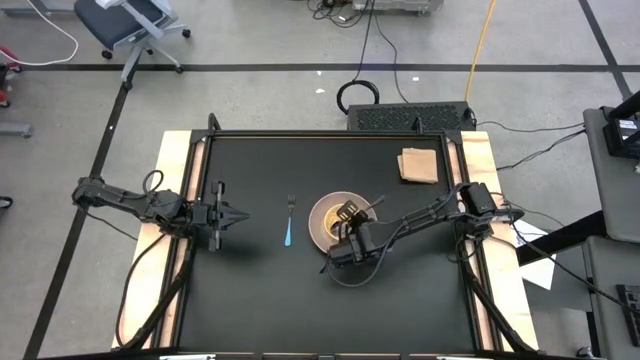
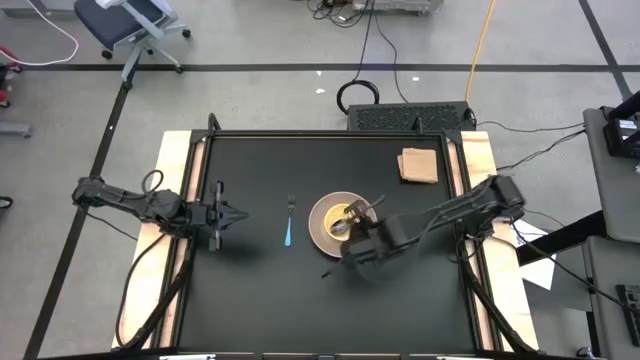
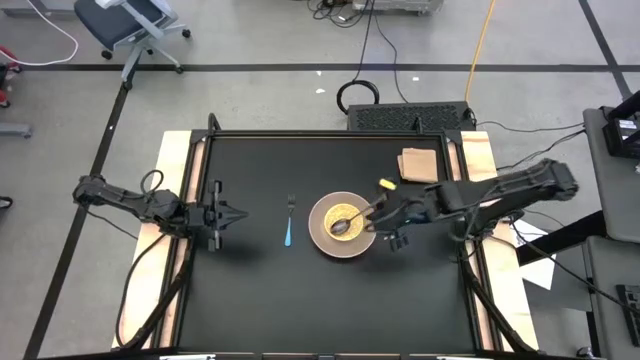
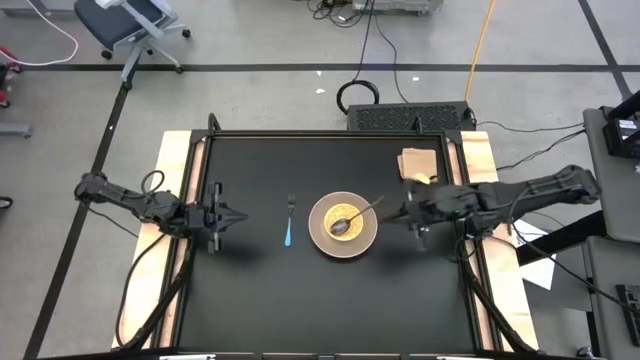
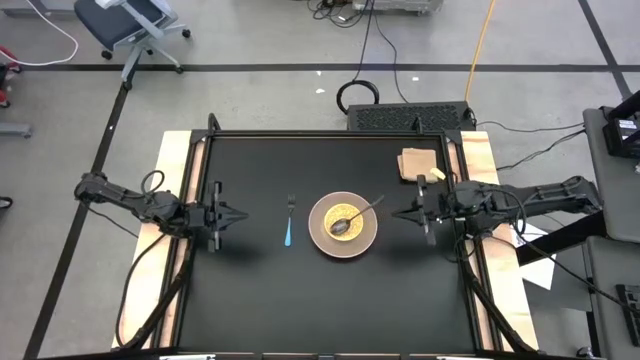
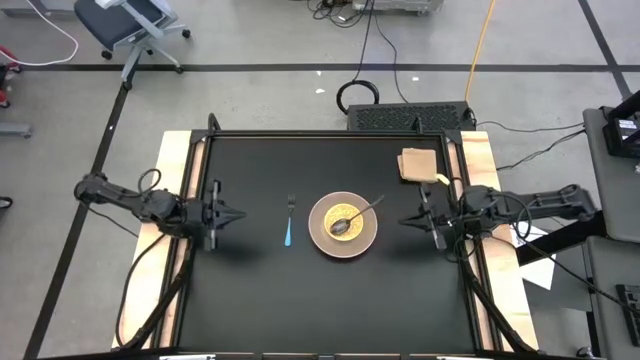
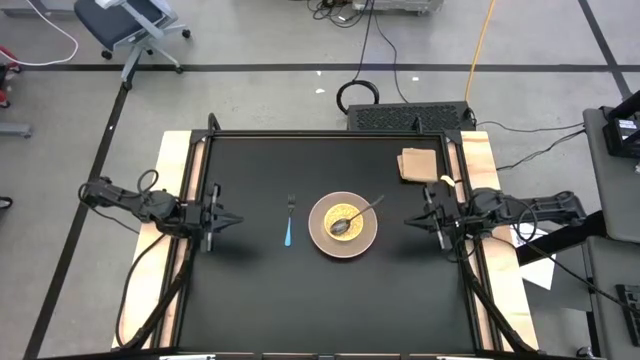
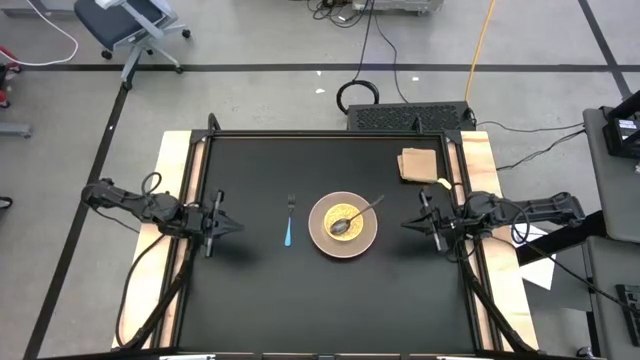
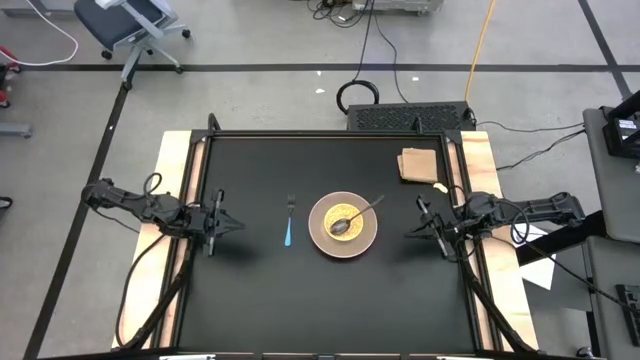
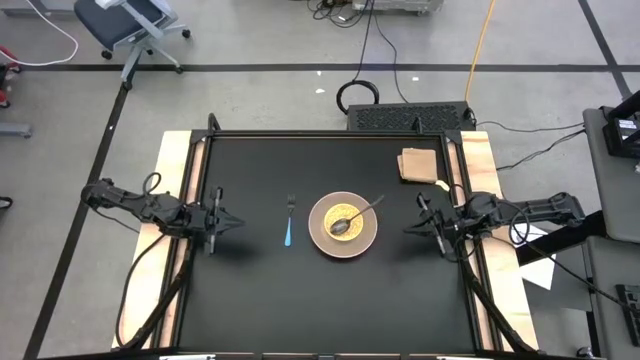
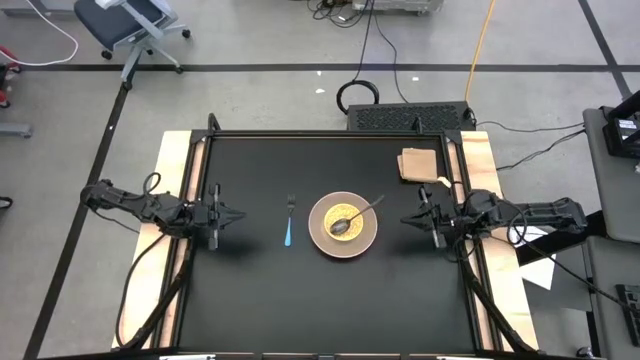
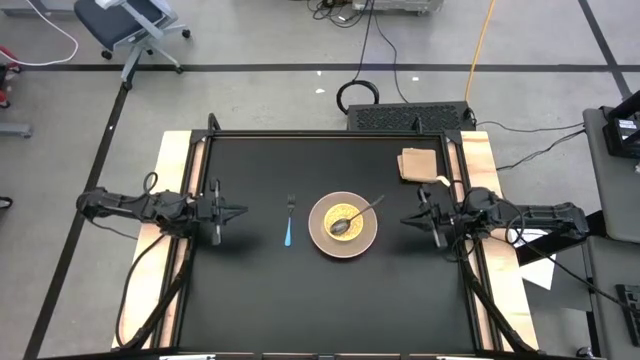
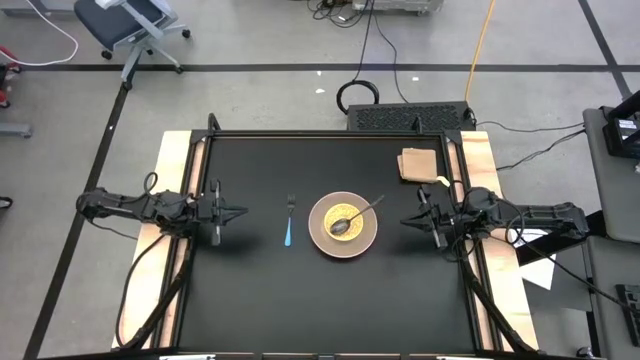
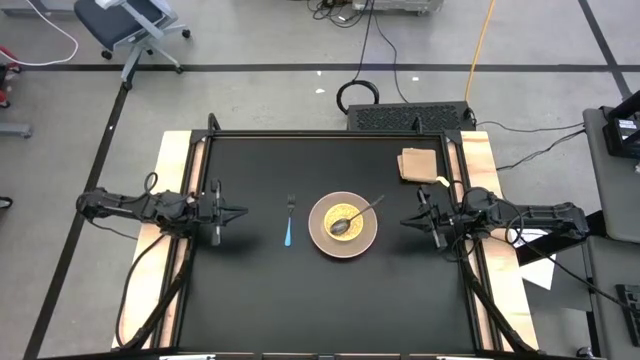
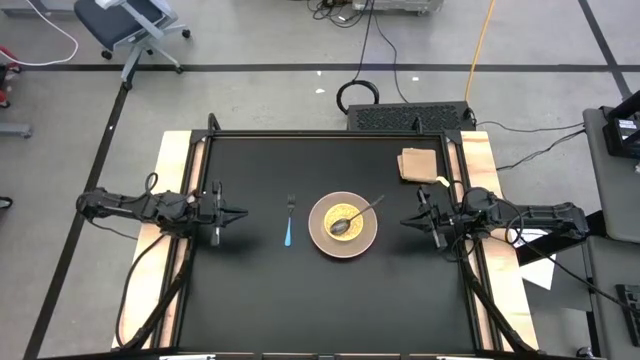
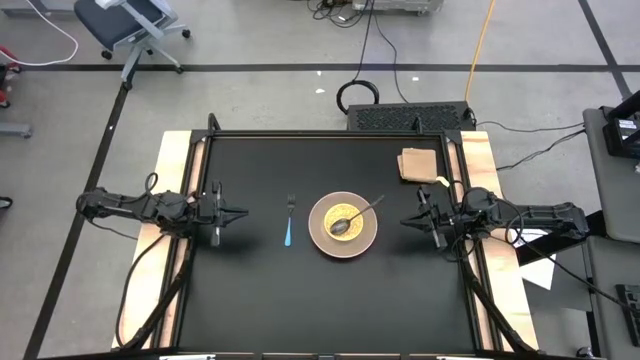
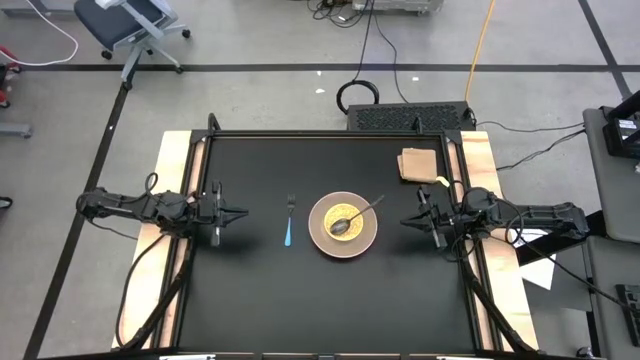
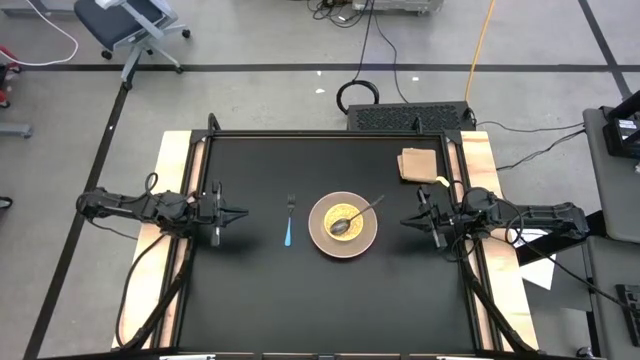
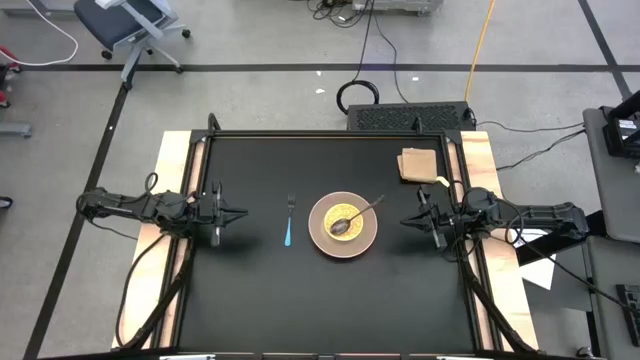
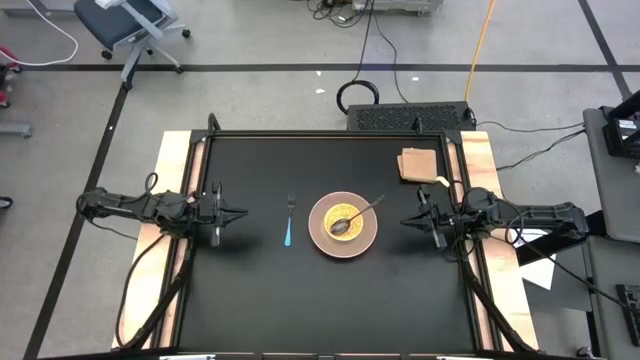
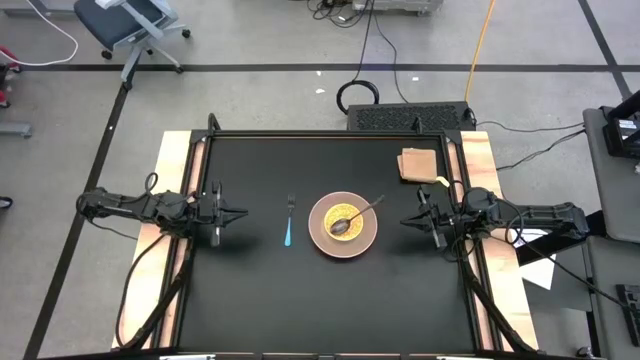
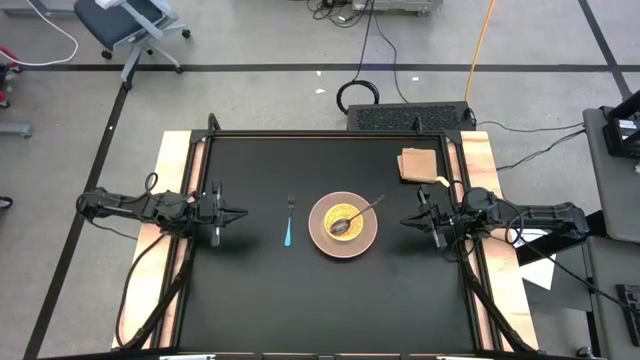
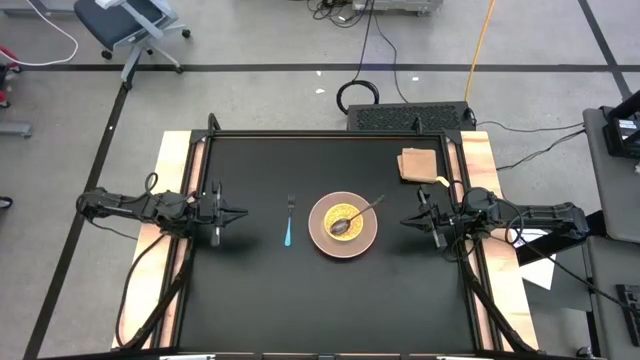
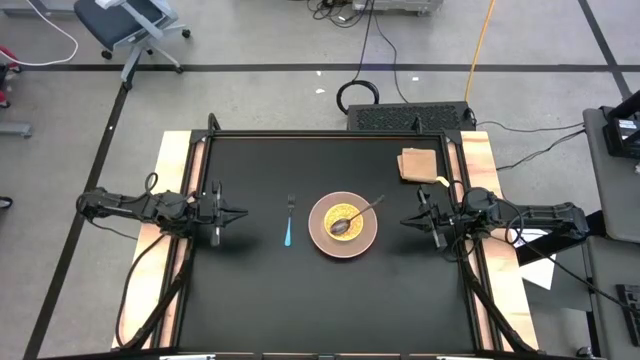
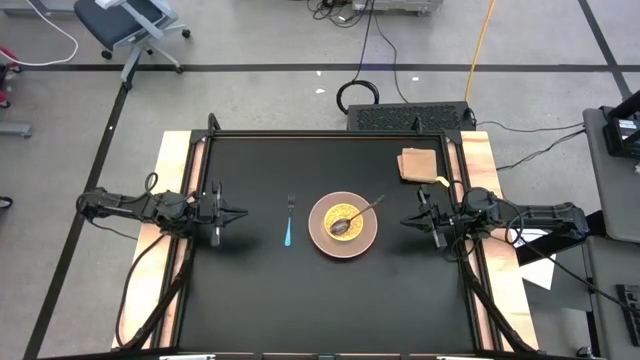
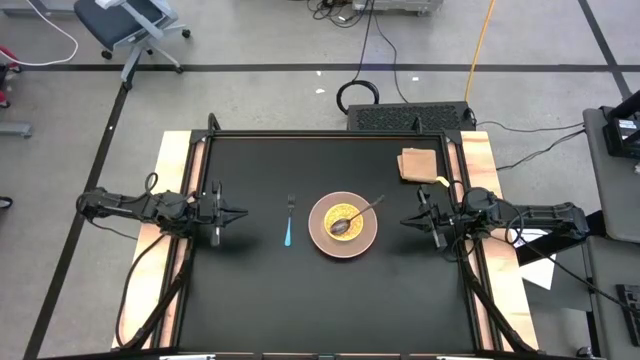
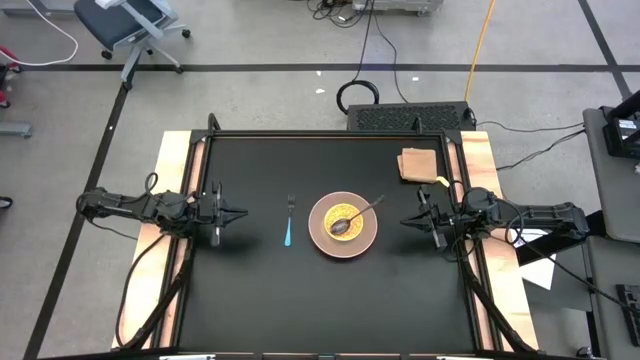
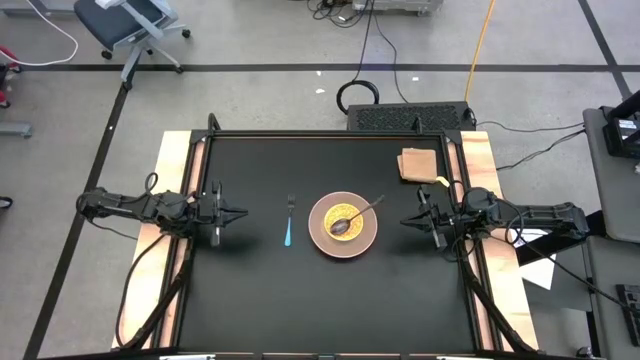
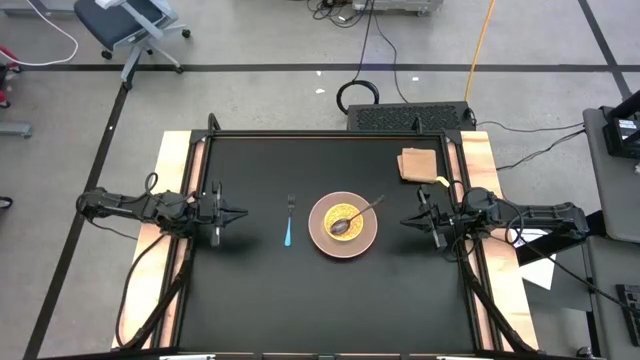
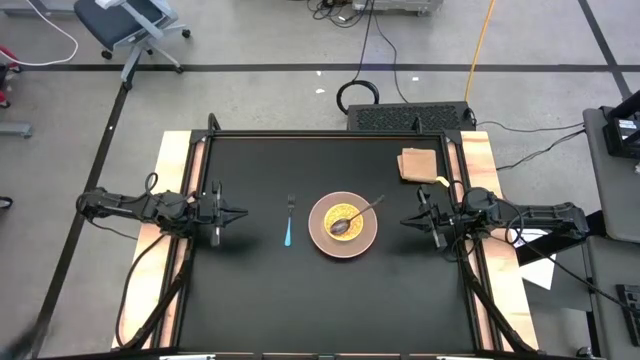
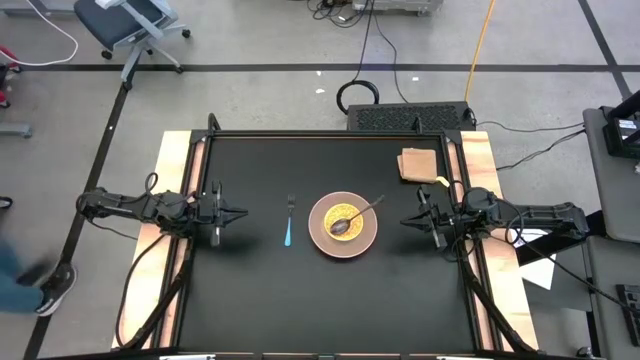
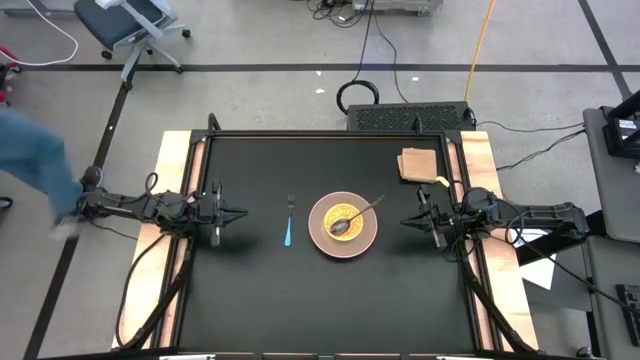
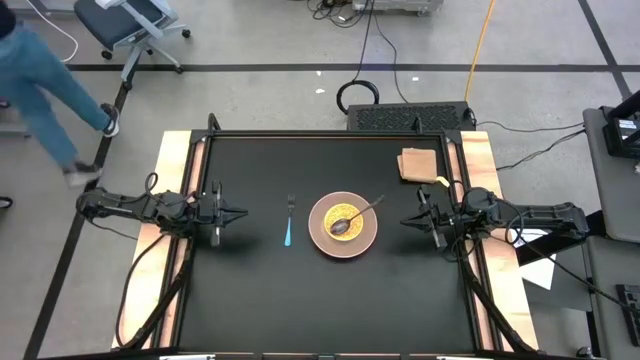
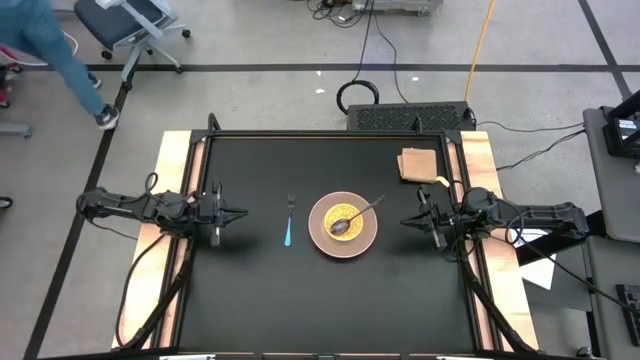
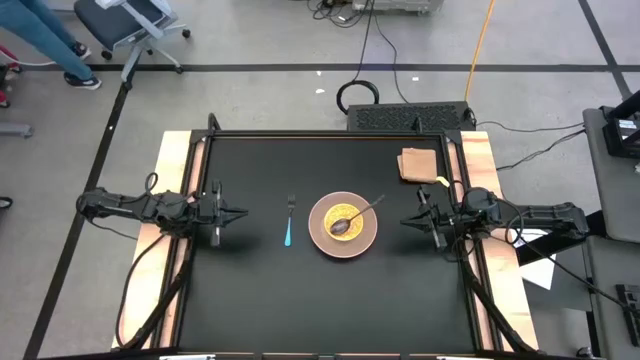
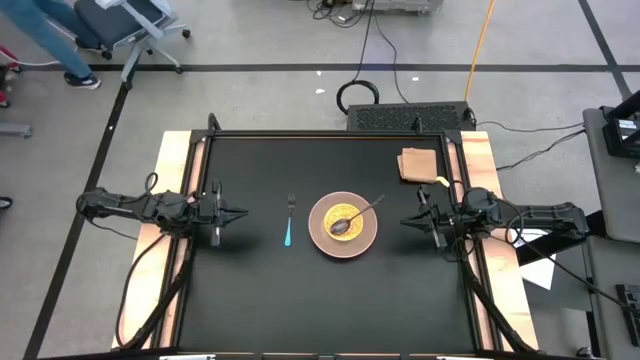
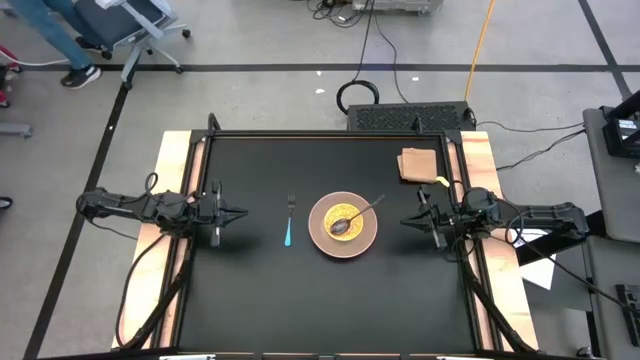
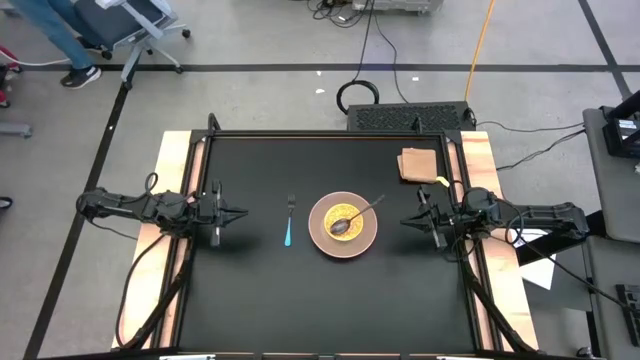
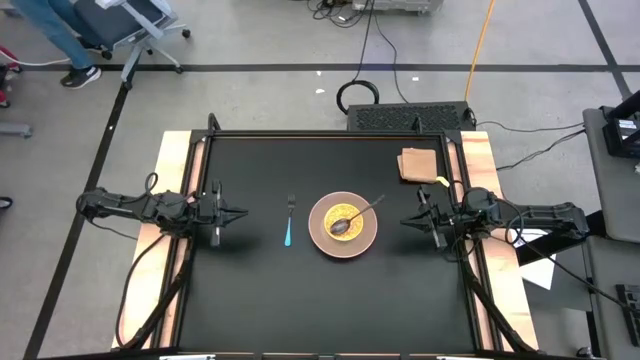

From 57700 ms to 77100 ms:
Task: Set table place
Return to Home Position

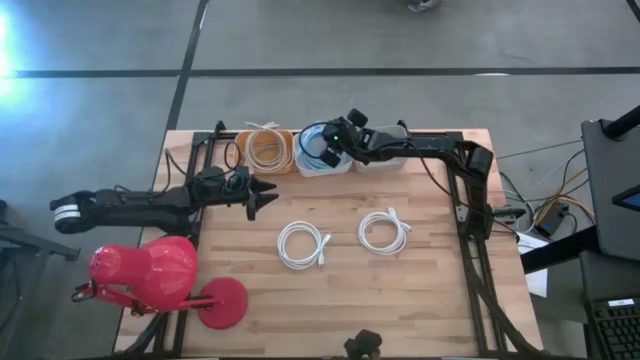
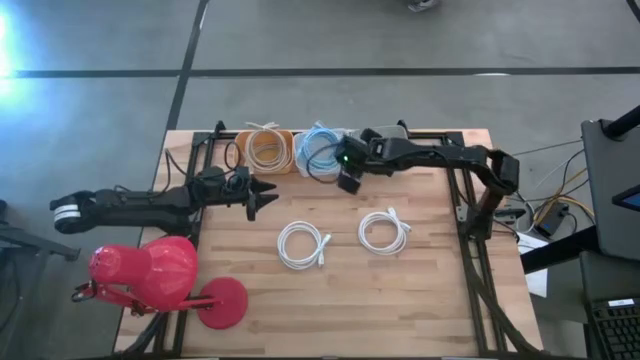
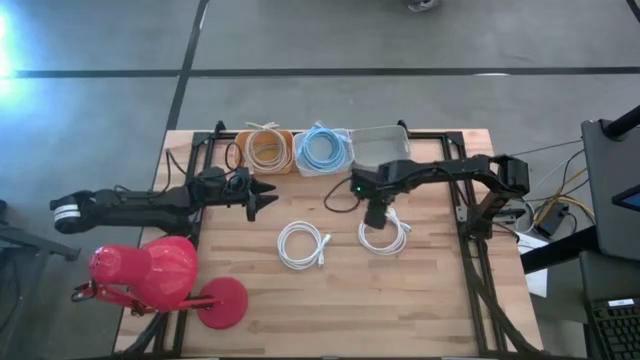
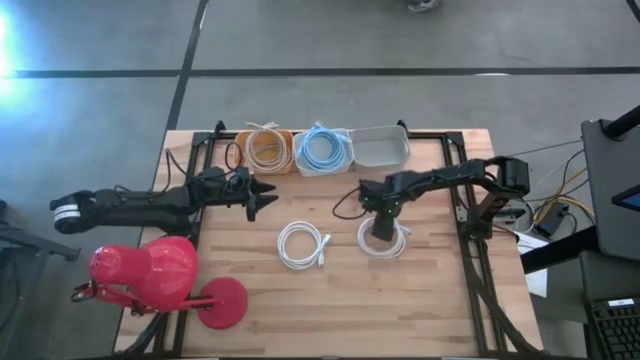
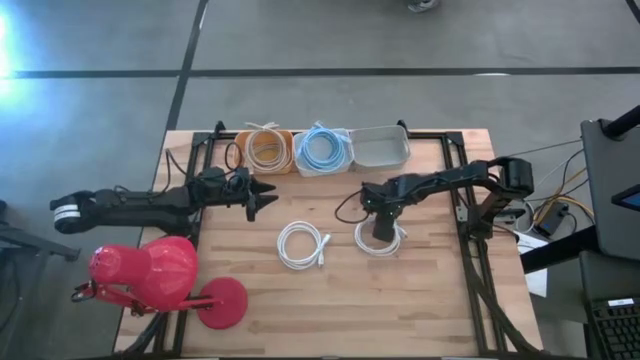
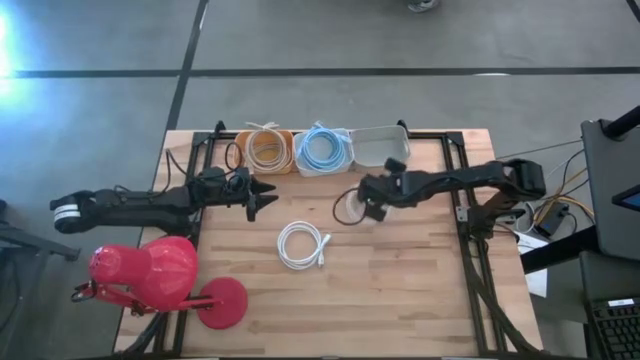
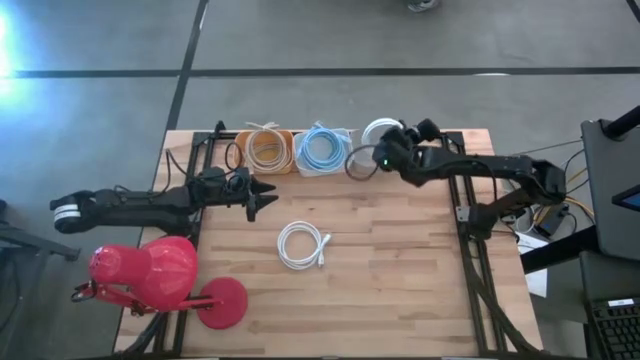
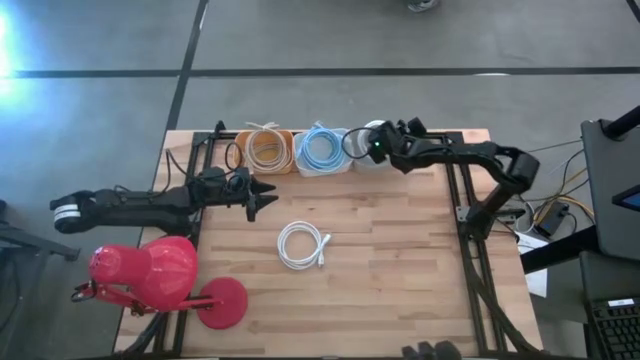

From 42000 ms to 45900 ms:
Task: Sort HDMI cables
Put the white HDMI cable into the gray bin
